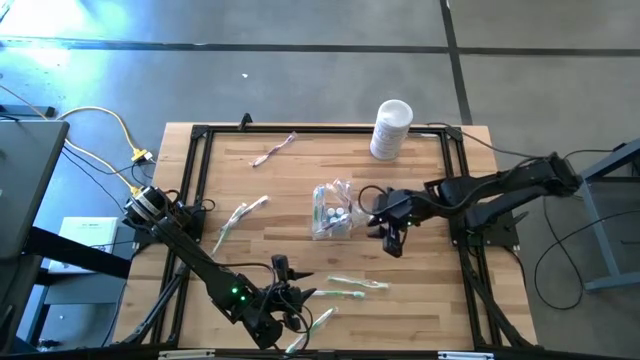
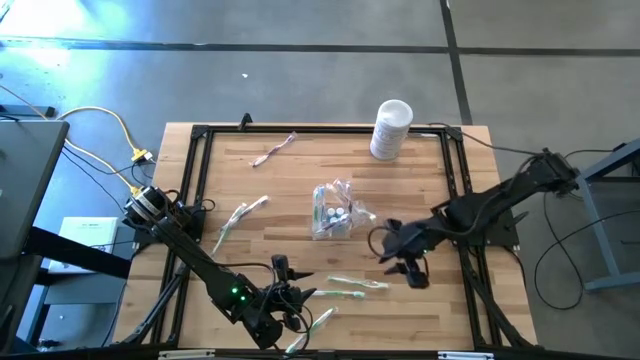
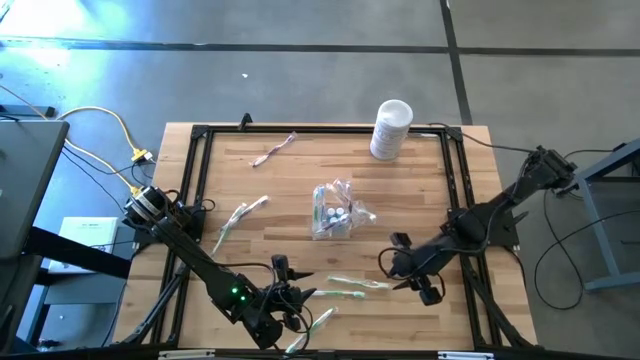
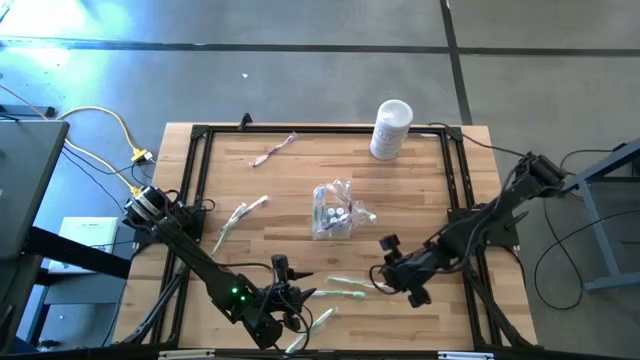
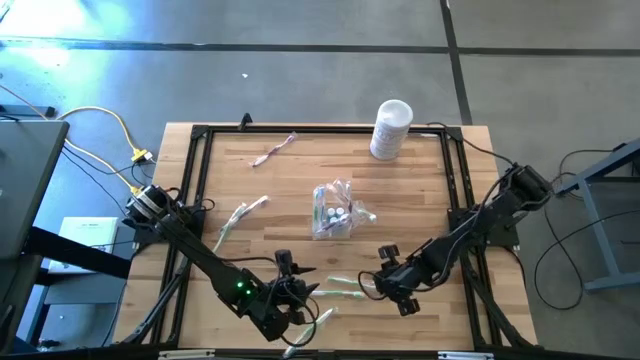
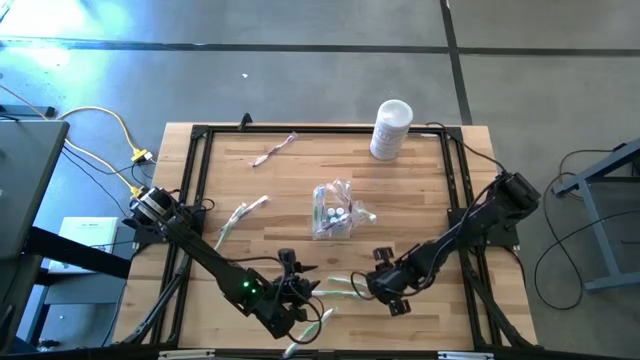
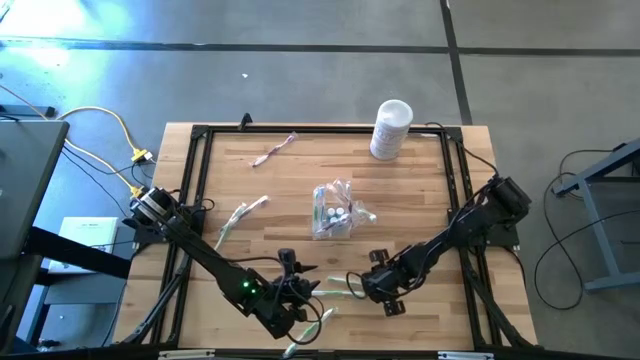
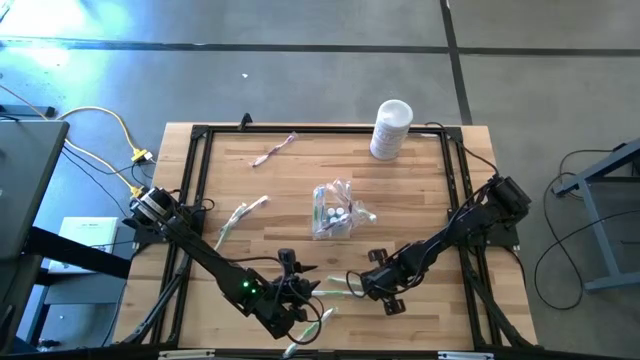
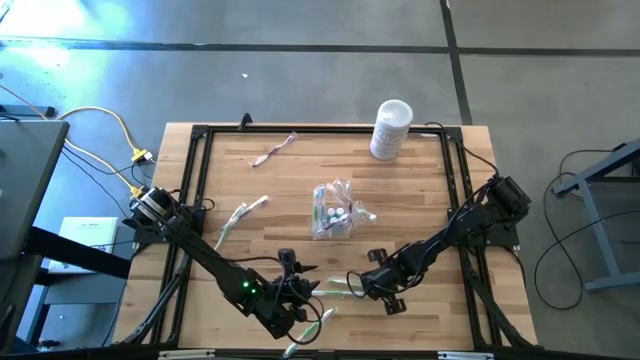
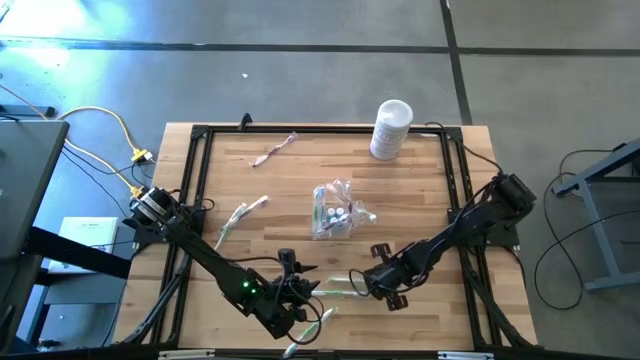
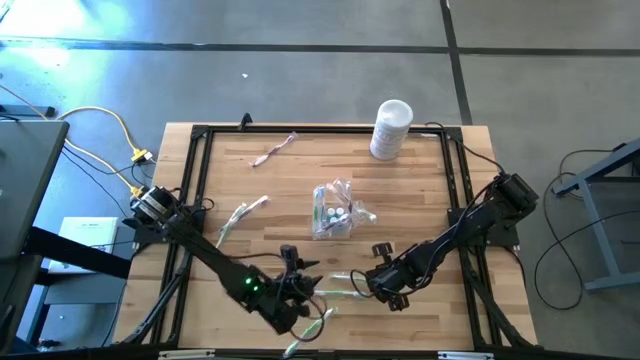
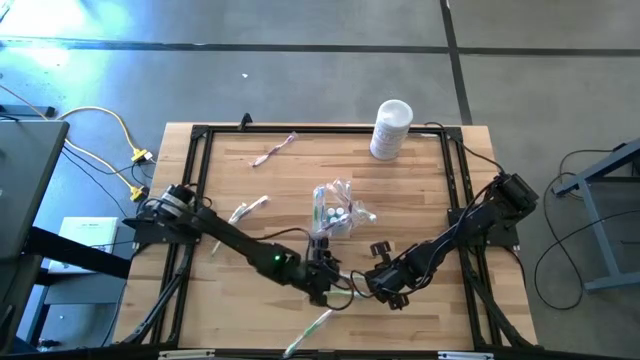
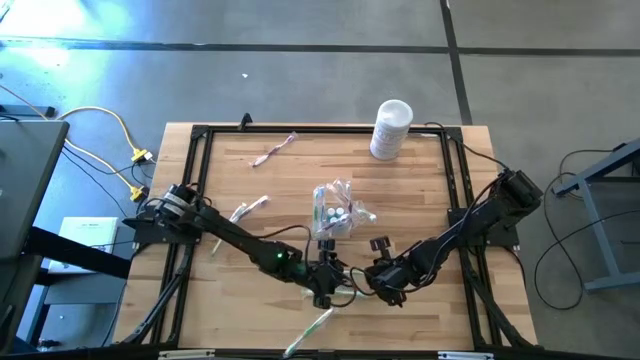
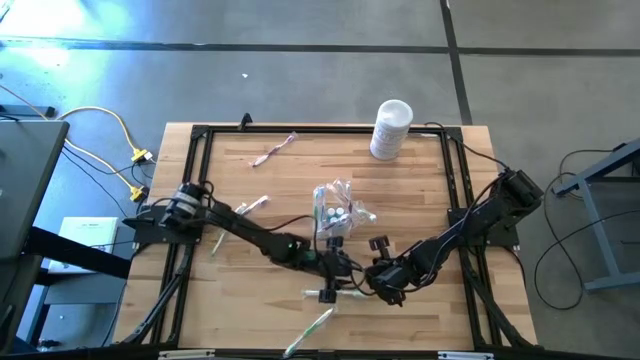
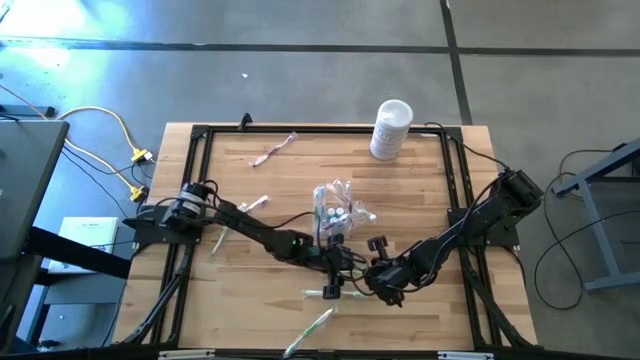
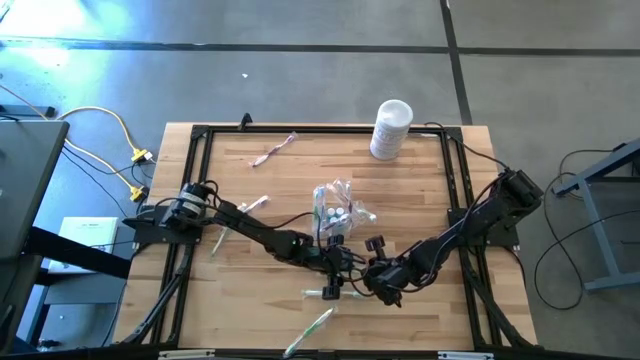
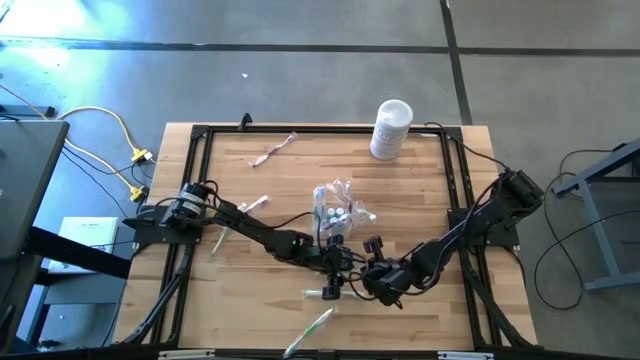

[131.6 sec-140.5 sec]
Task: Pick & Place toothbrushing station
Put the green toothbrush into the transparent organizer

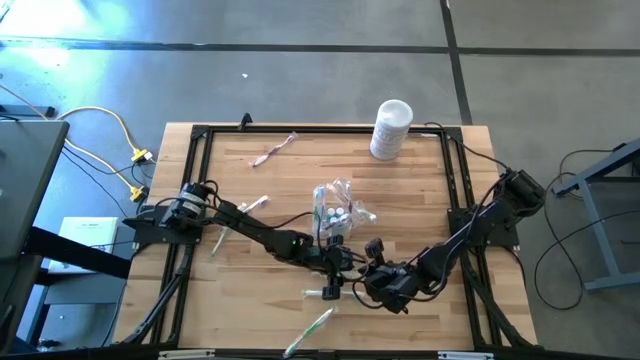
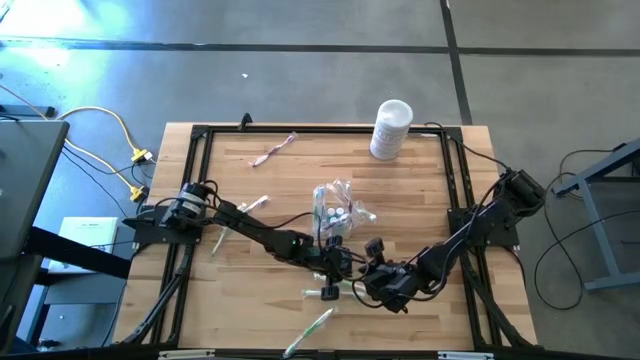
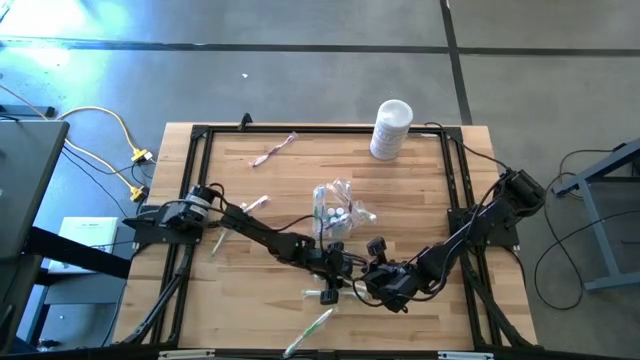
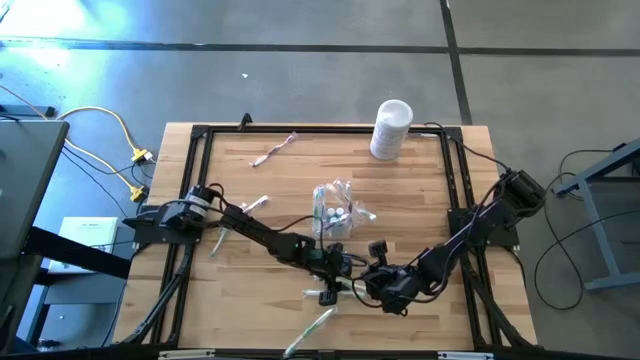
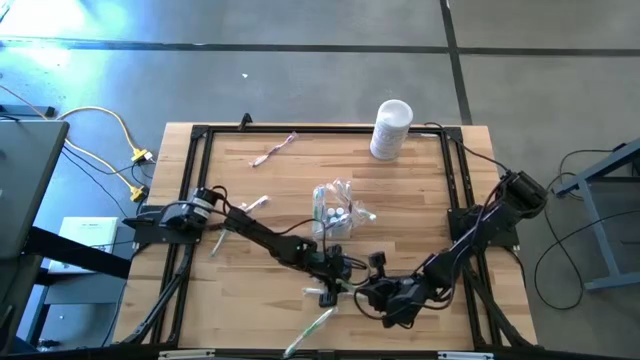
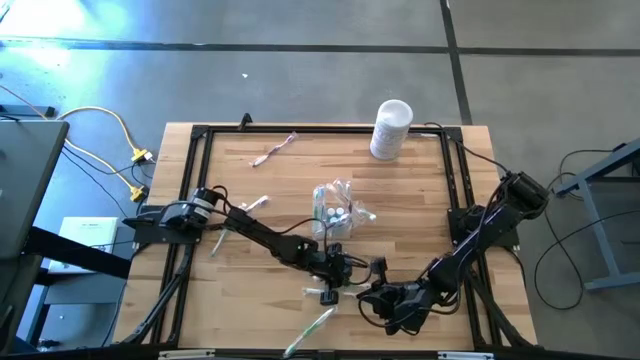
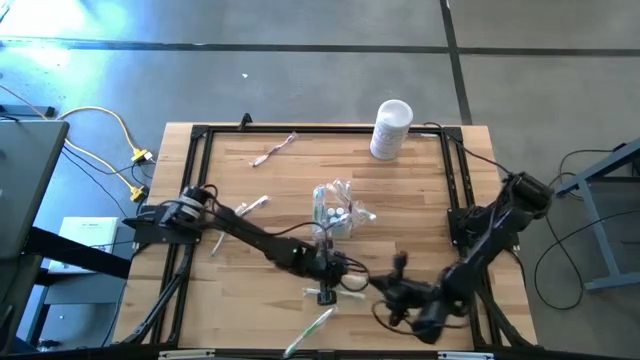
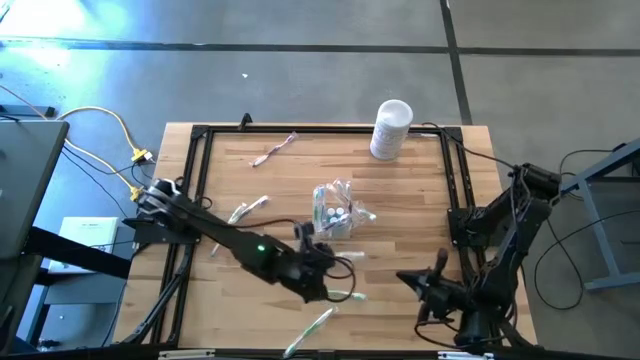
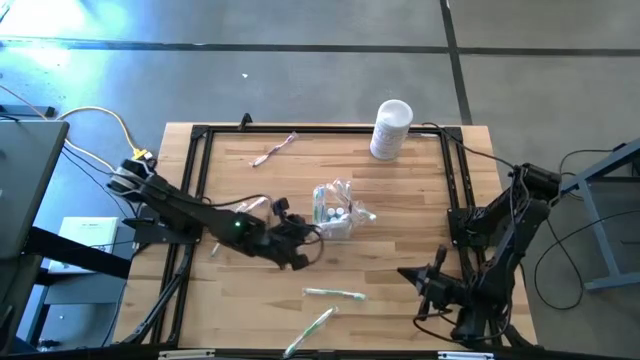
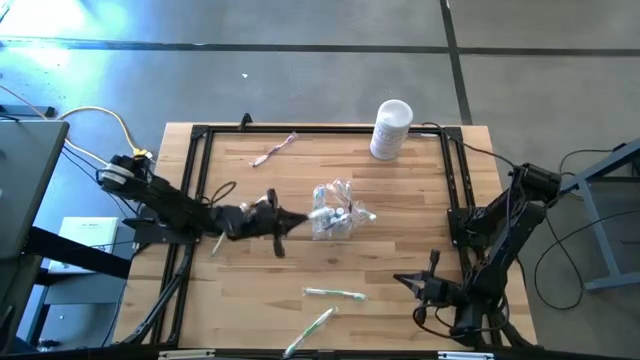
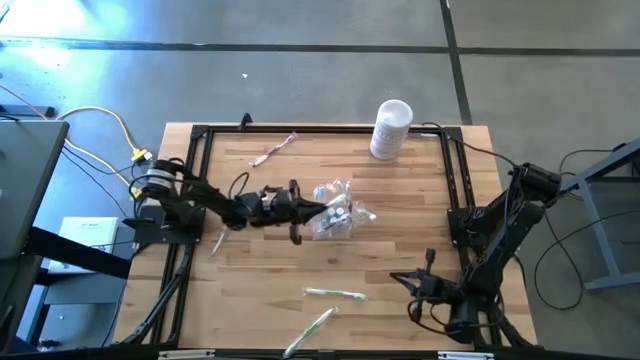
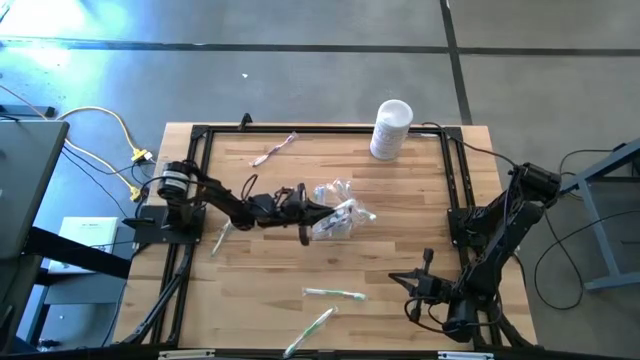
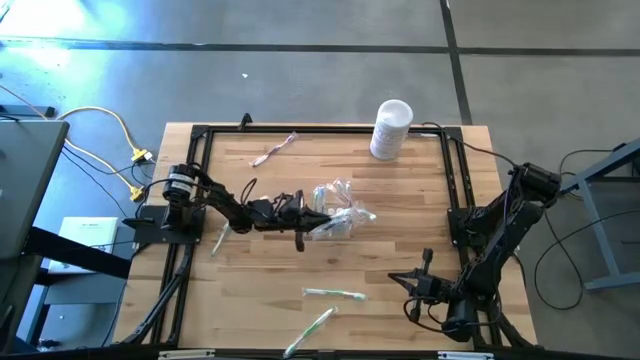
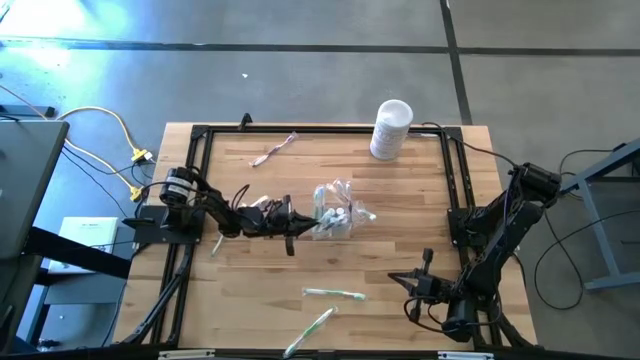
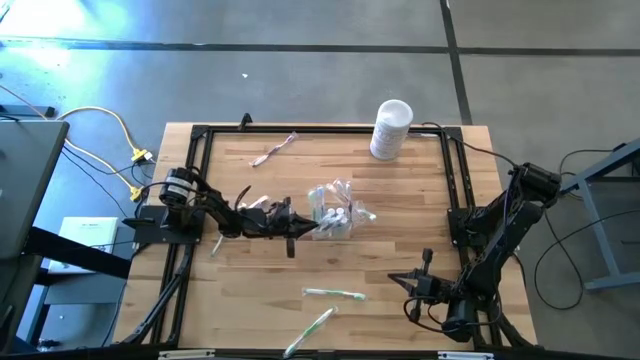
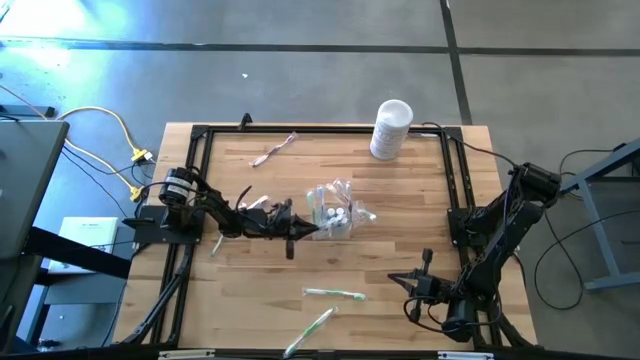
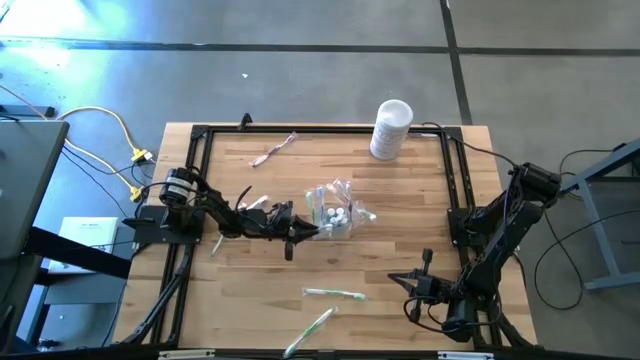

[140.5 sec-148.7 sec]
Put the green toothbrush into the transparent organizer

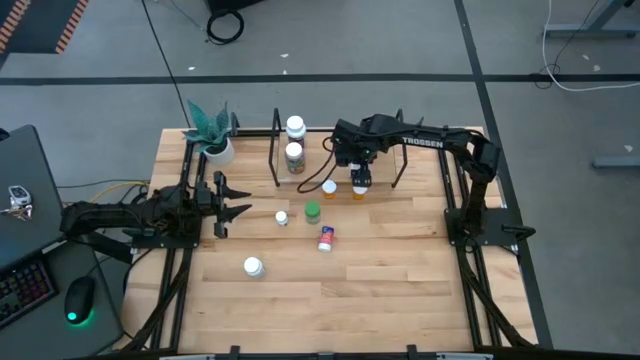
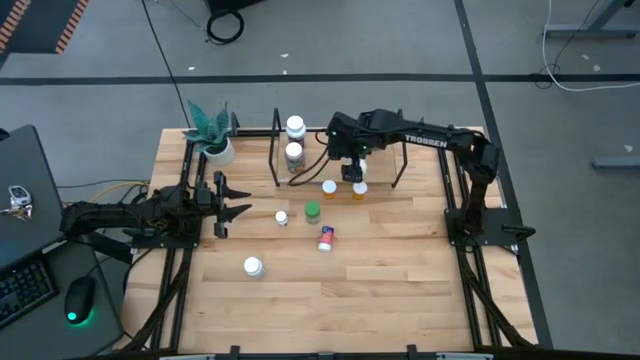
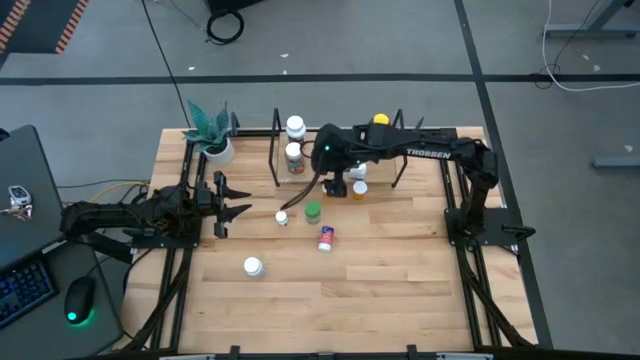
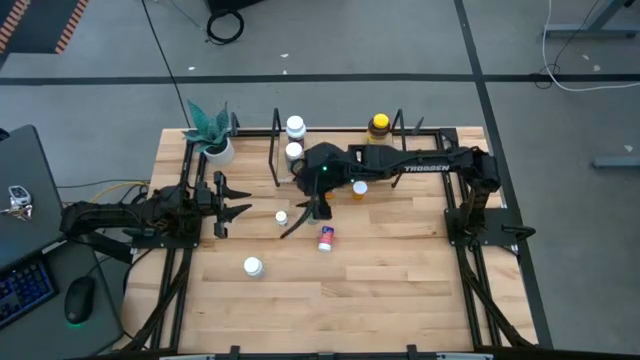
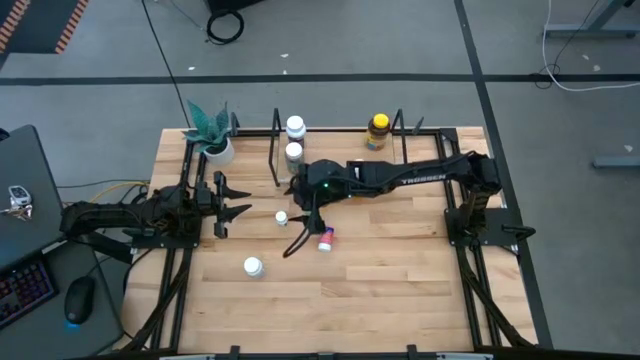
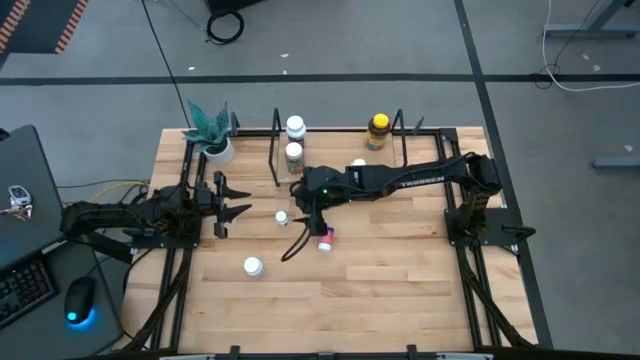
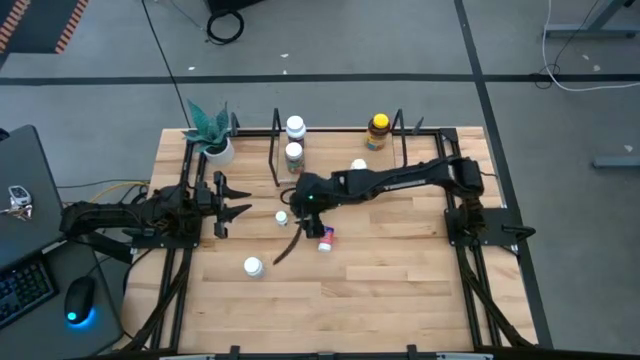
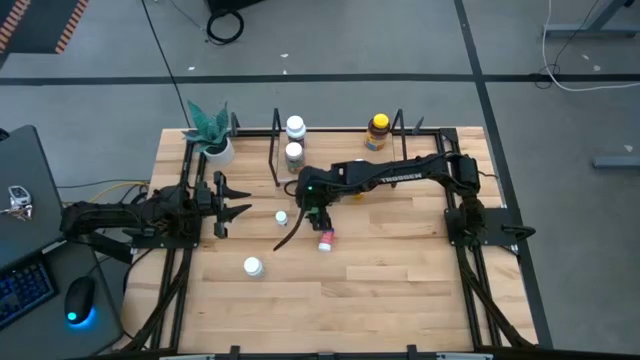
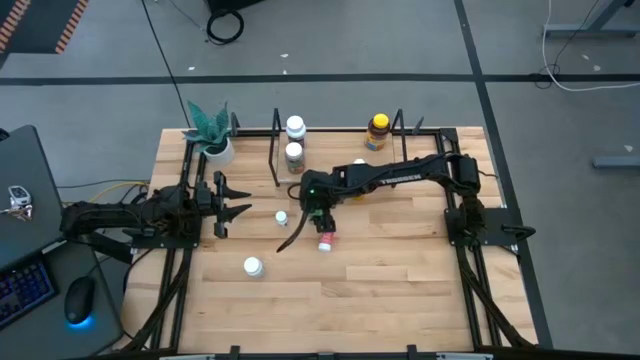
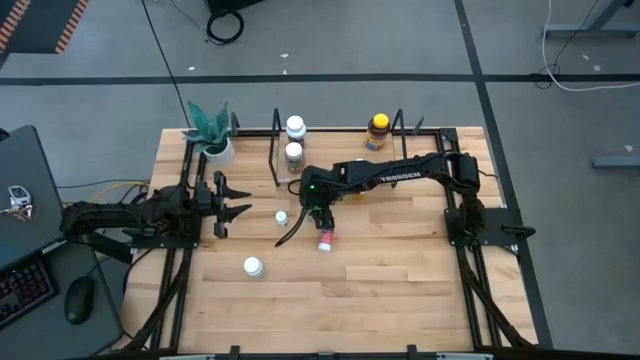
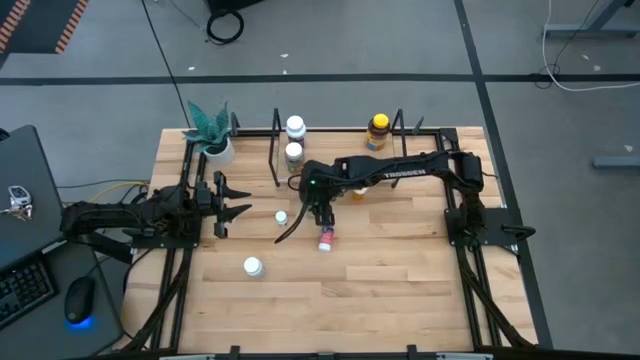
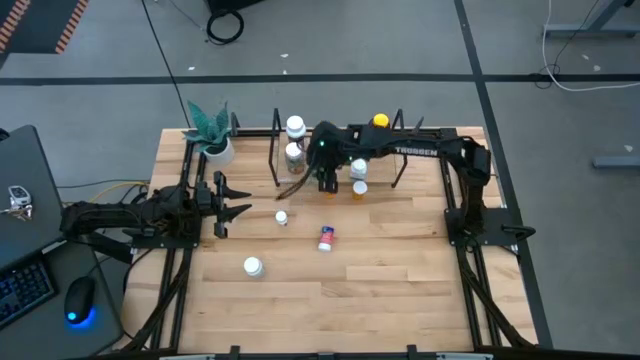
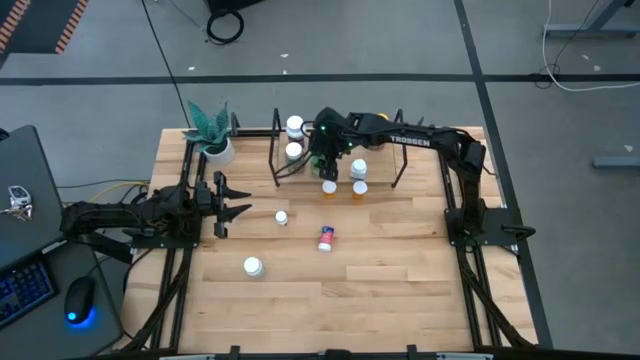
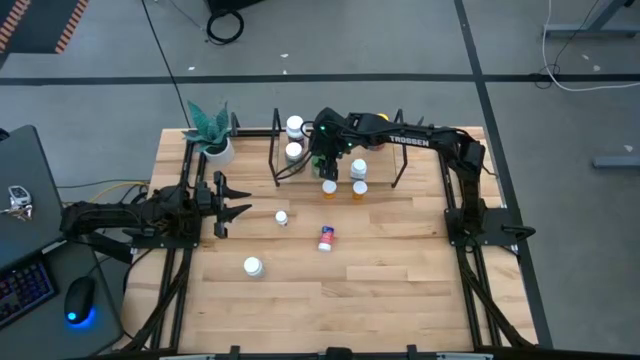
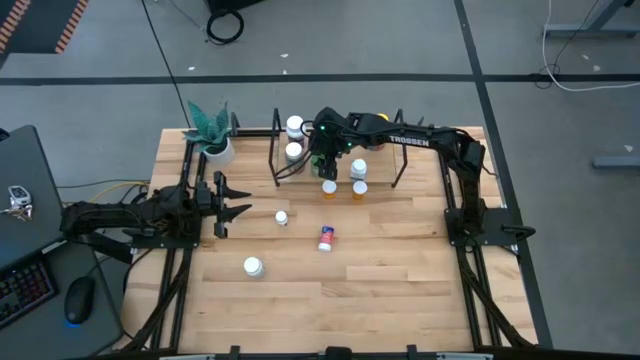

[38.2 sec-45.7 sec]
Task: Pick and place medicine bottles onto shelf by color
Put the light green pill bottle on the shelf
